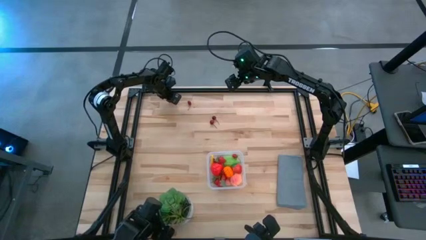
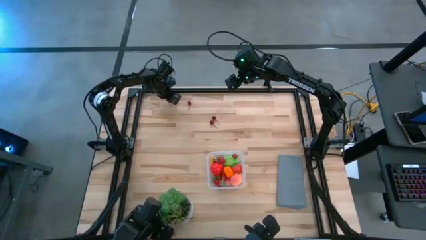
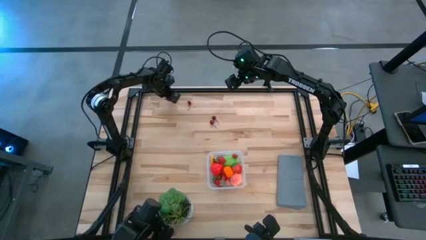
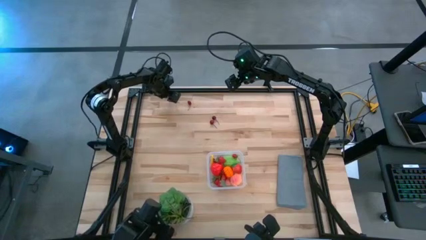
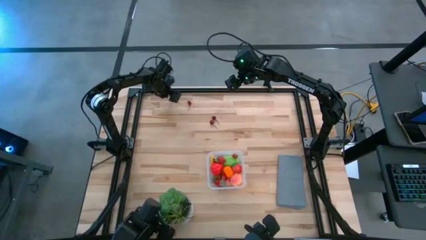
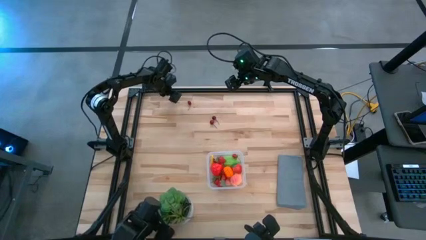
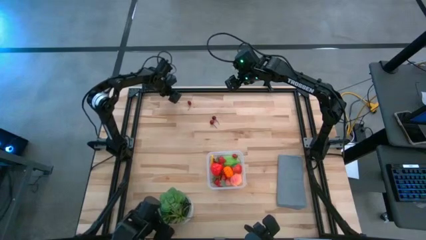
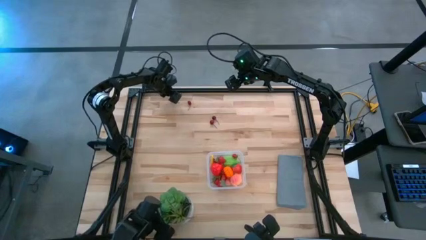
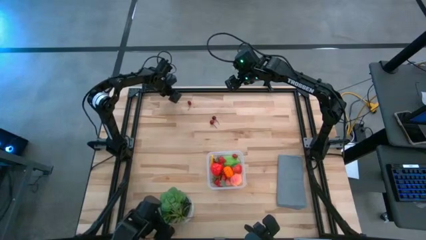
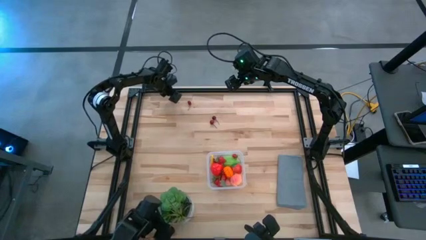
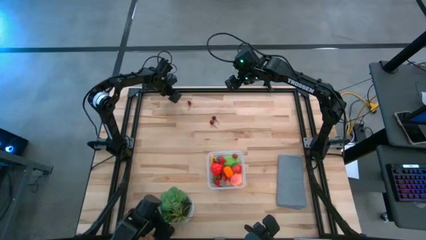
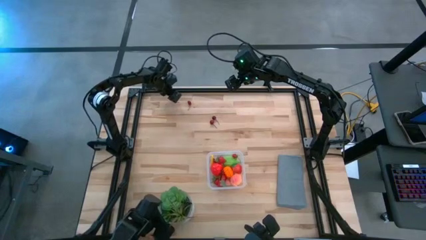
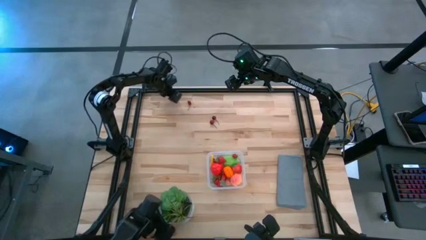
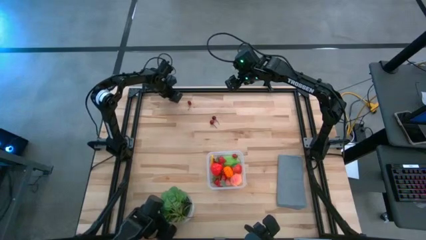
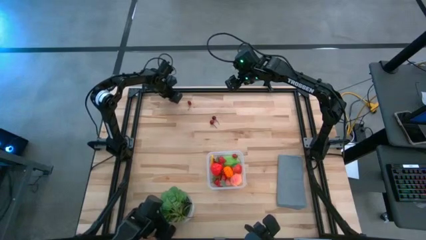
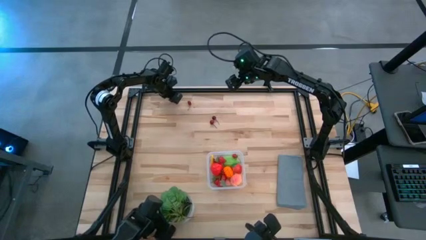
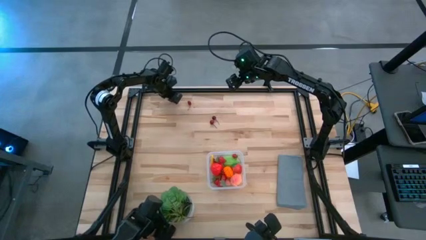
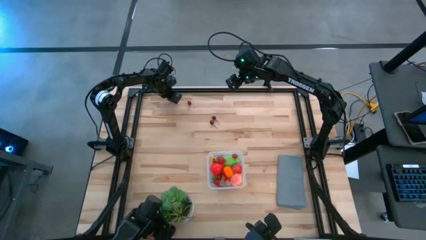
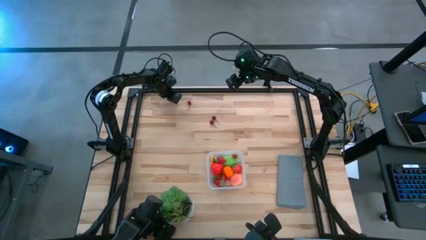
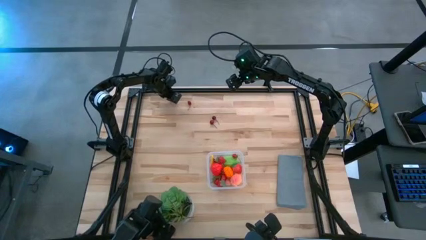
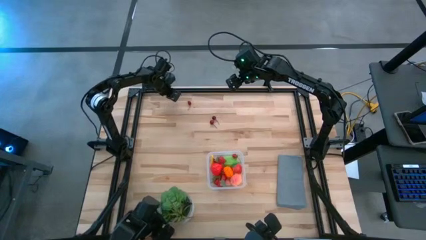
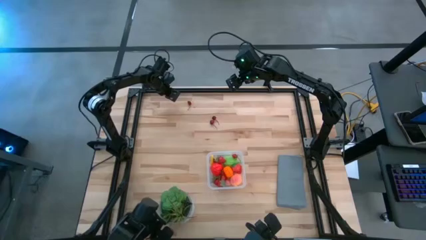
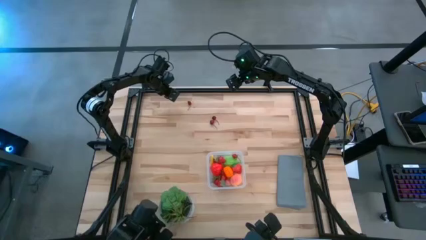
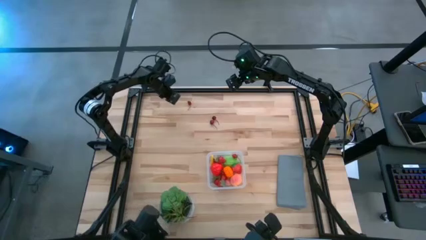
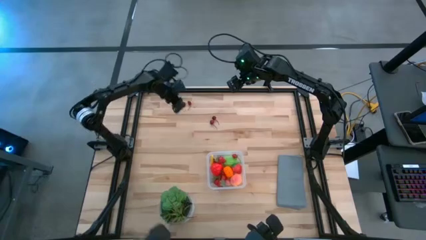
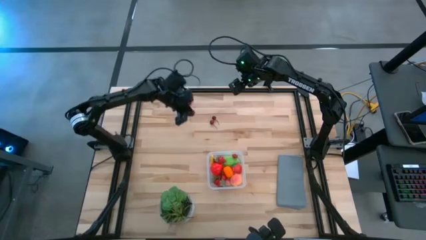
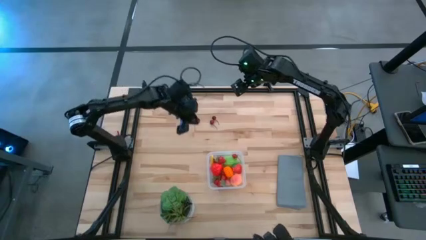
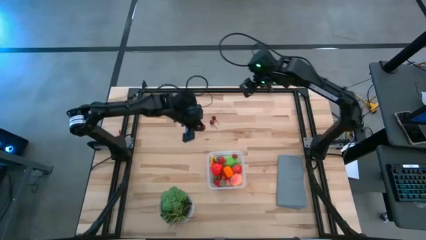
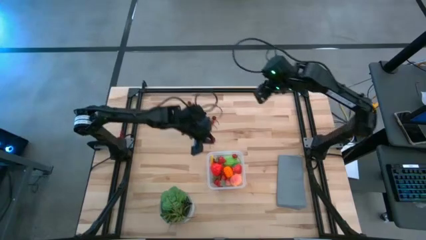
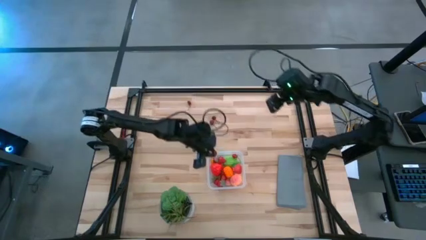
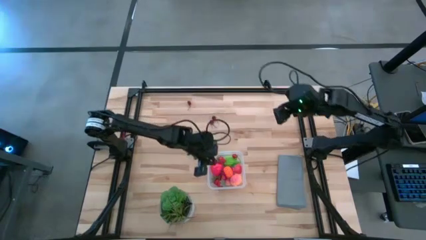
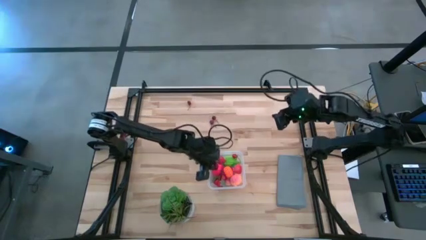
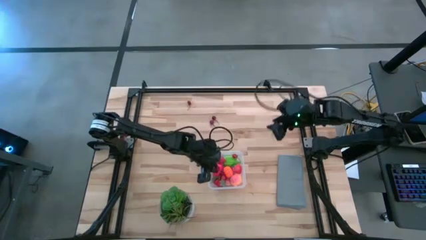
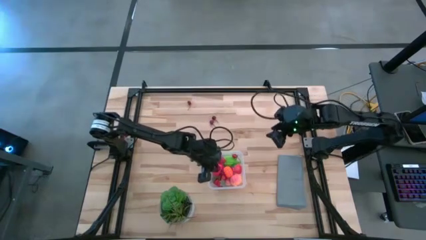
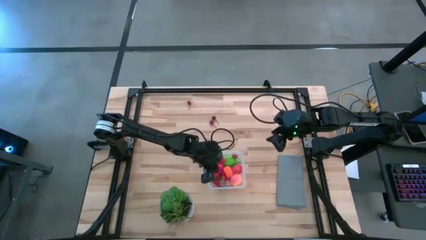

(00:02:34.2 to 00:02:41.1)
Task: Pick and placing Produce into tupperware
Put the red cherry into the transparent bin

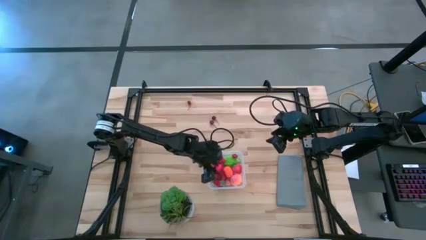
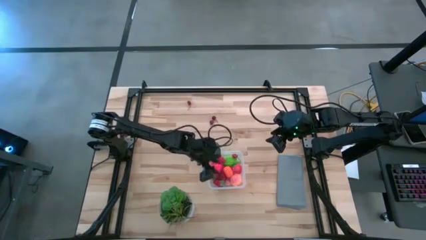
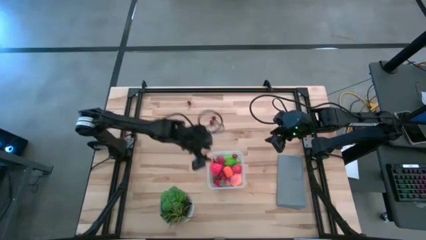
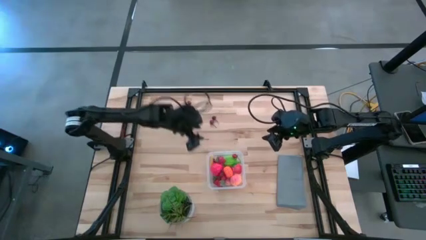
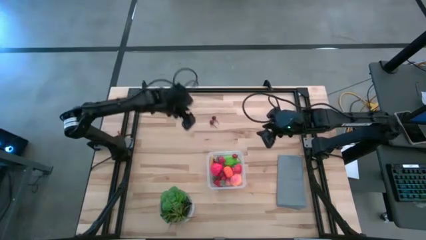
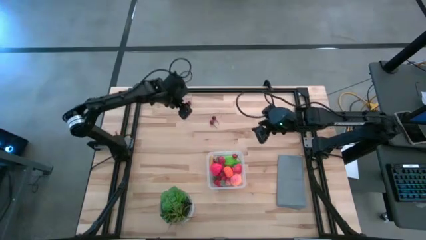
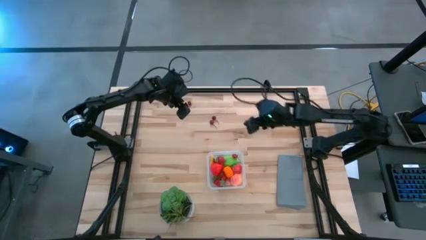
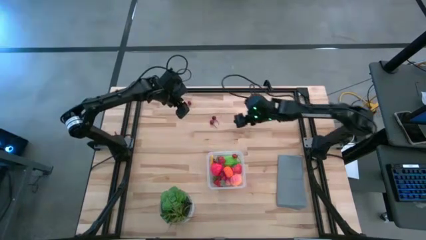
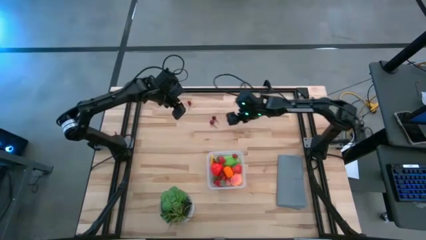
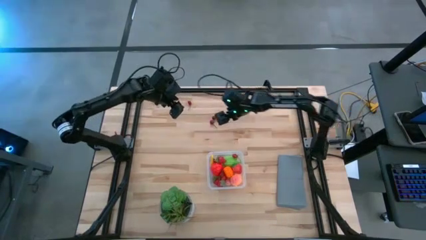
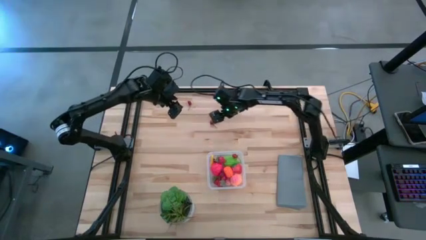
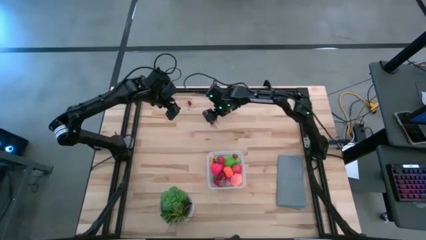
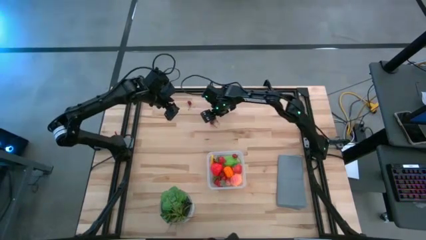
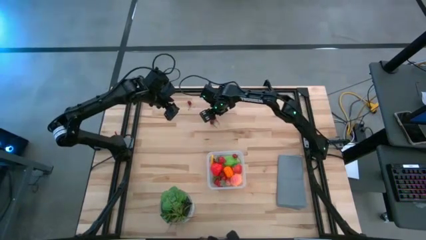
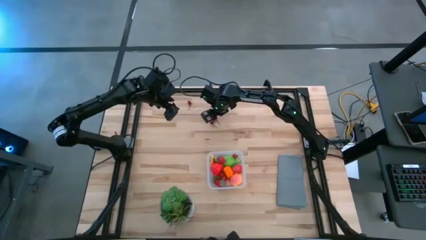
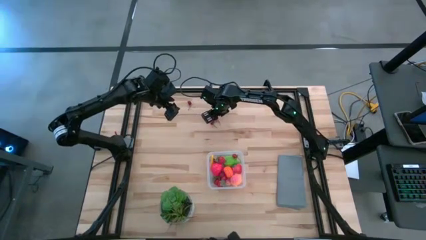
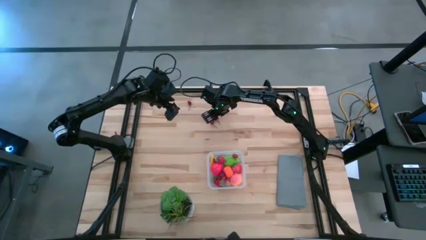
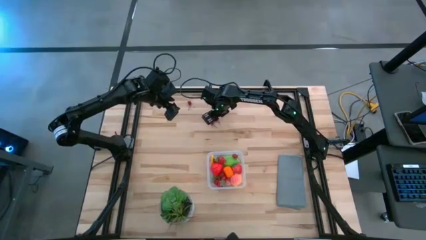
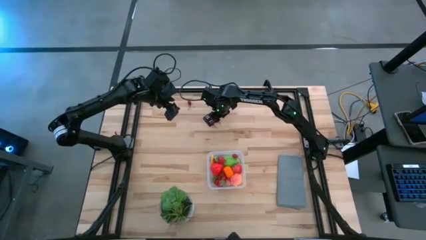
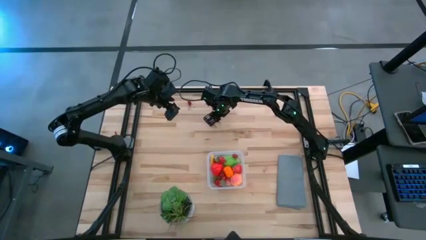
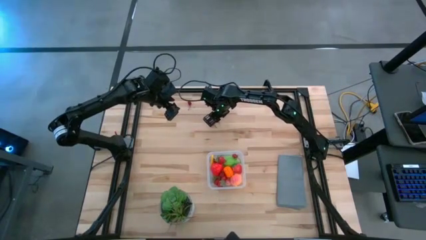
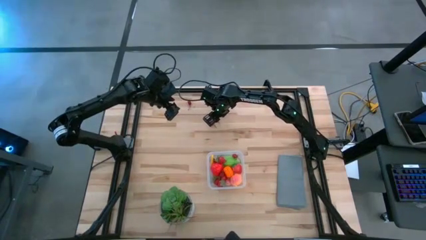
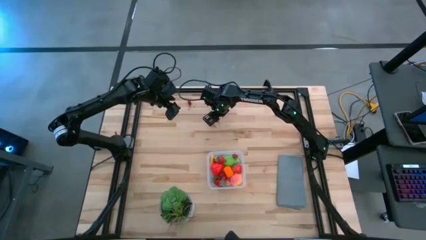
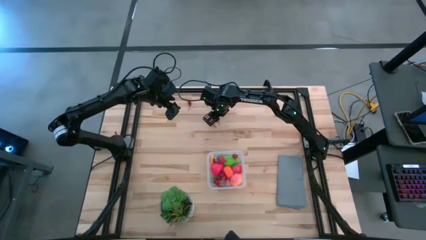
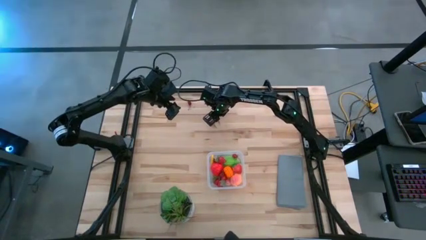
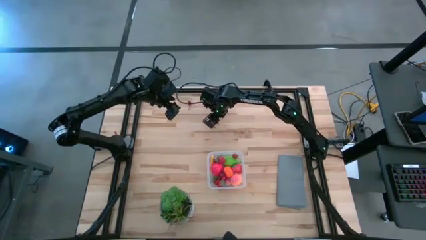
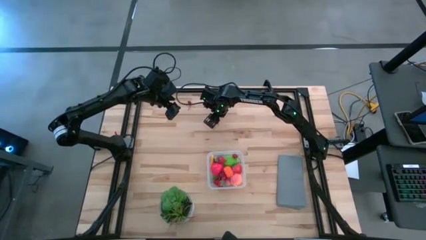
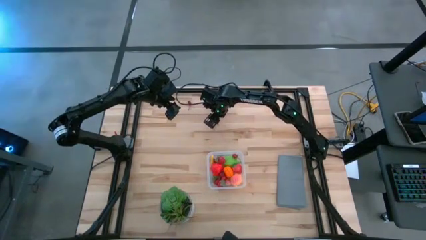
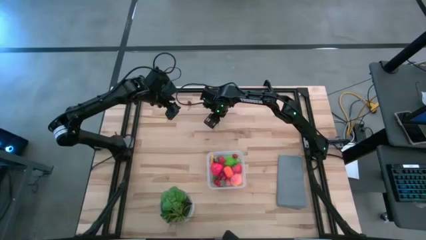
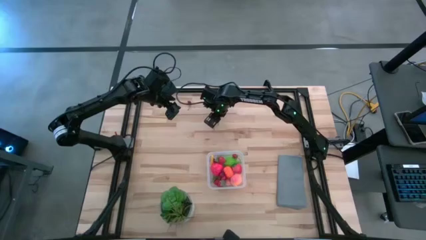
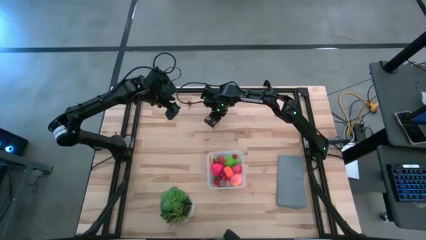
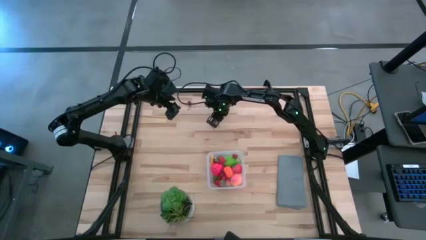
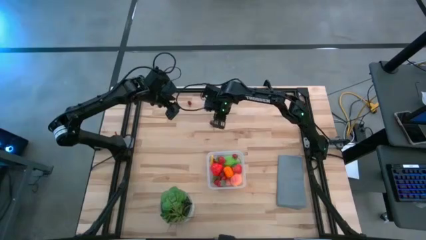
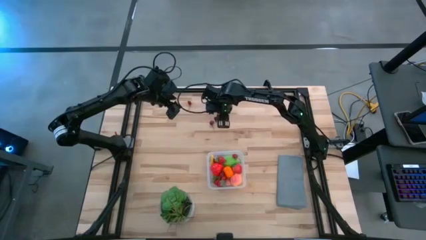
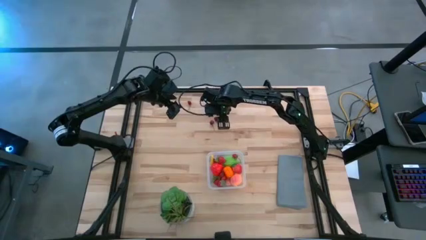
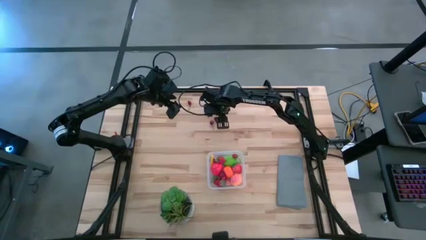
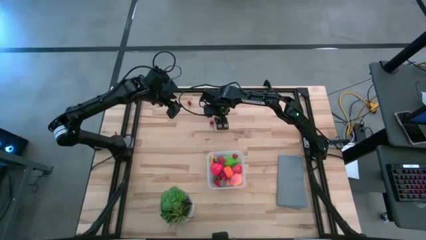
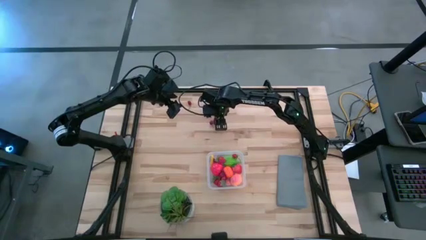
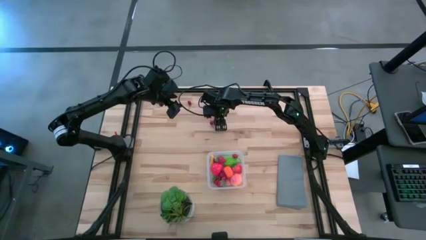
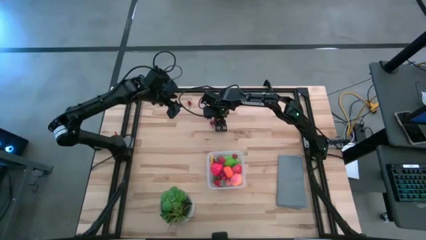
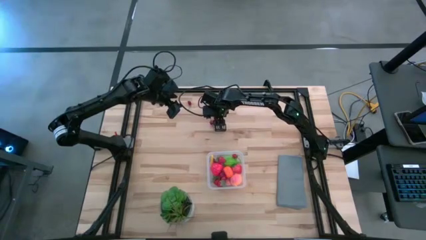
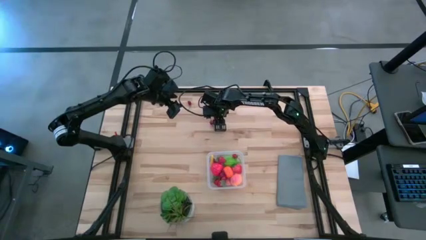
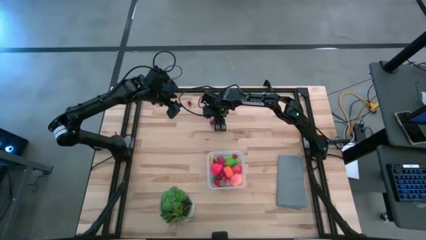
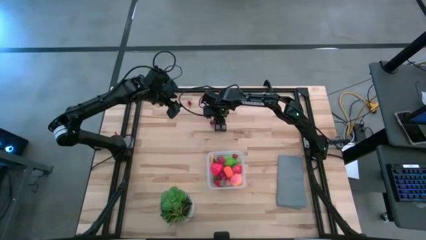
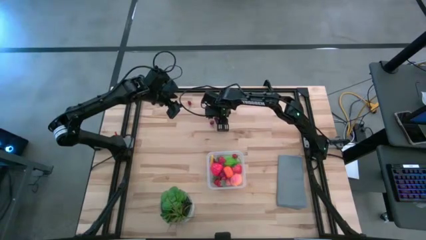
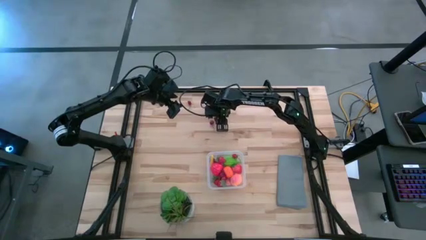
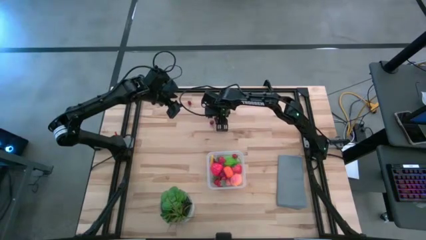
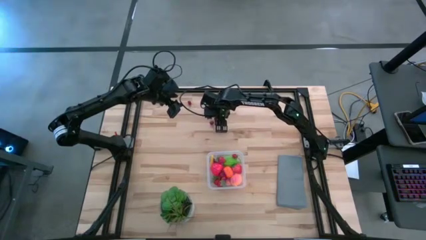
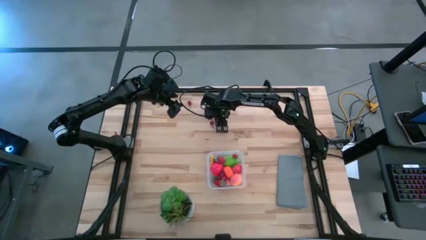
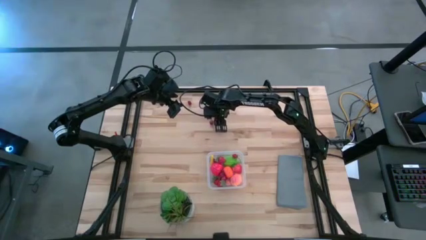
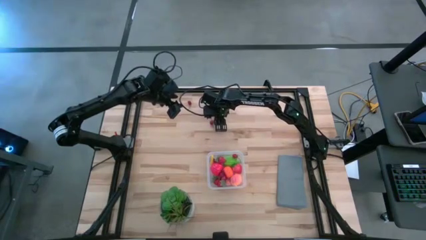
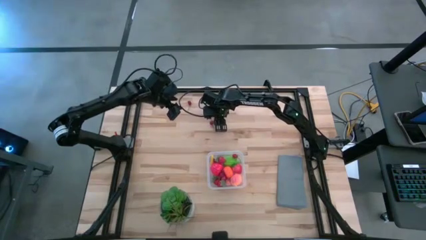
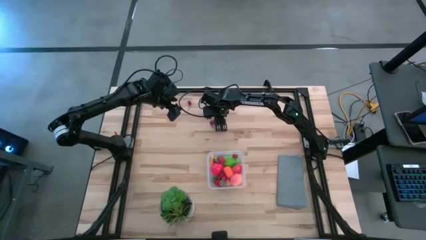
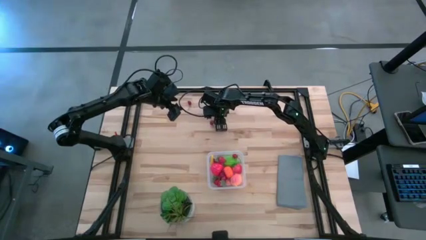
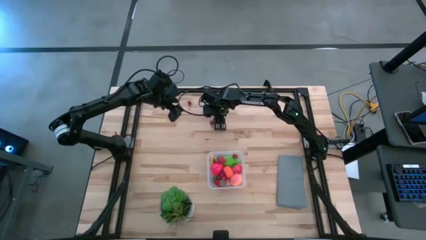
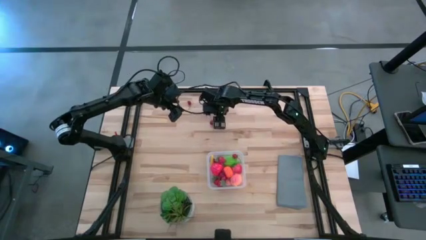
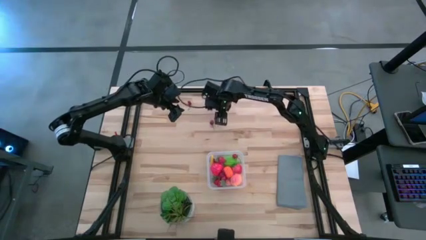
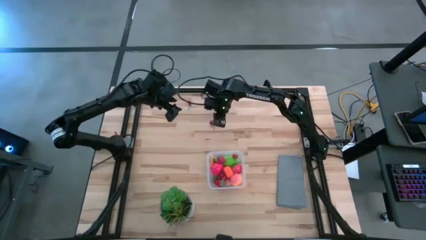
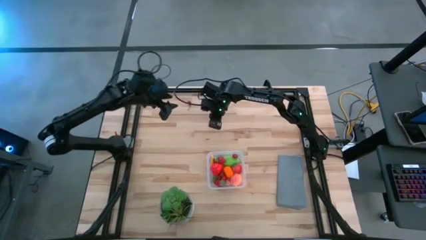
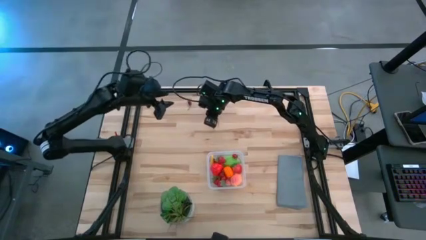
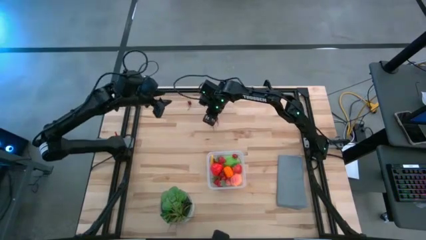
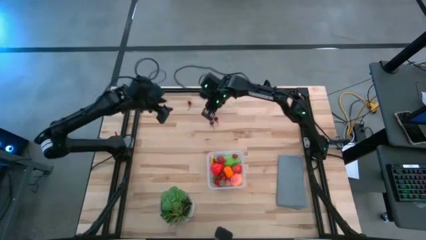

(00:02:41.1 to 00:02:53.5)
Put the red cherry into the transparent bin
